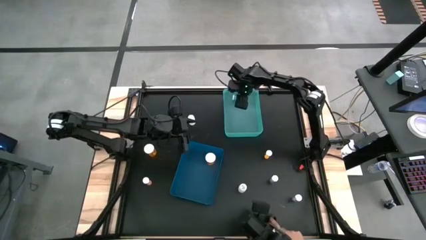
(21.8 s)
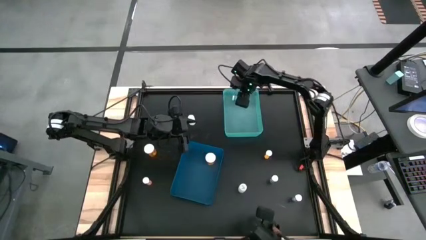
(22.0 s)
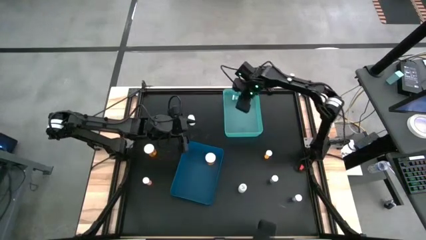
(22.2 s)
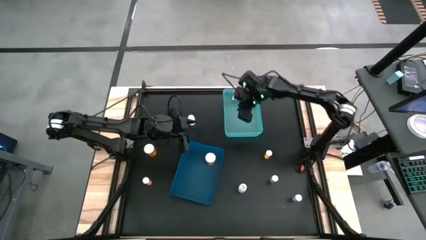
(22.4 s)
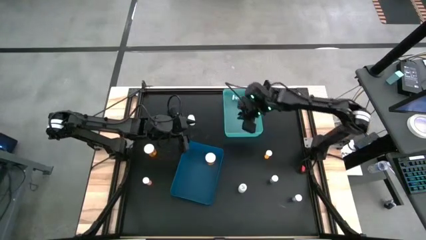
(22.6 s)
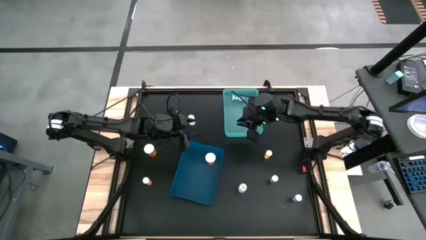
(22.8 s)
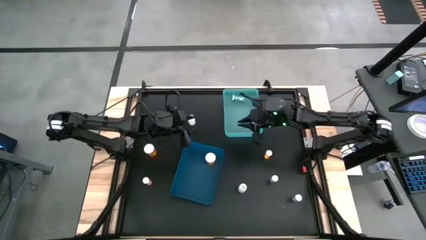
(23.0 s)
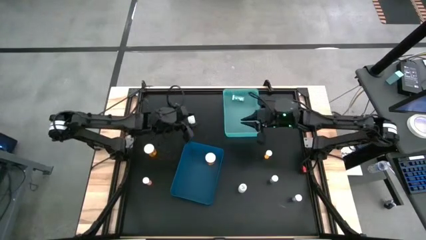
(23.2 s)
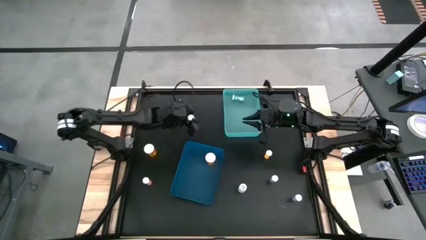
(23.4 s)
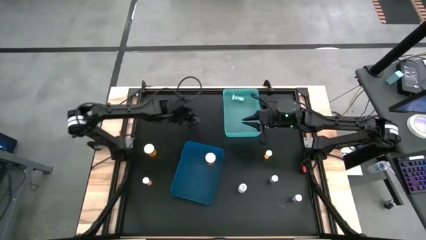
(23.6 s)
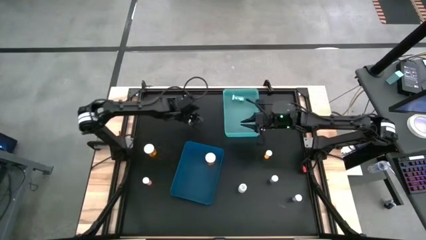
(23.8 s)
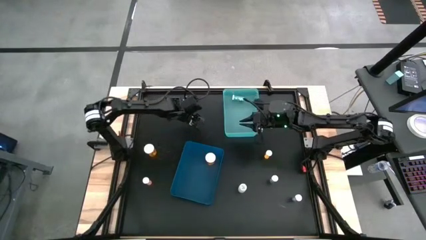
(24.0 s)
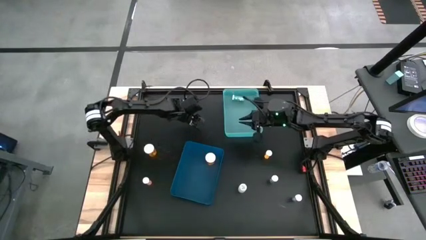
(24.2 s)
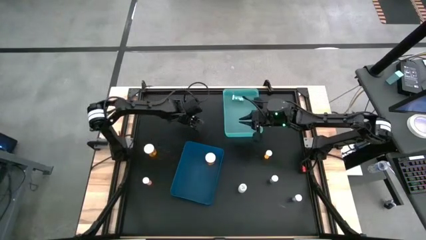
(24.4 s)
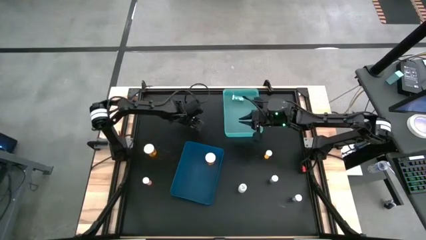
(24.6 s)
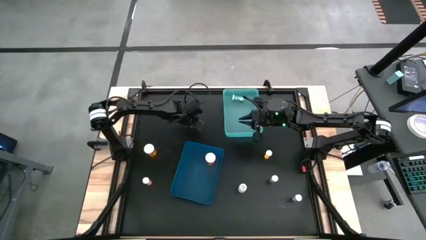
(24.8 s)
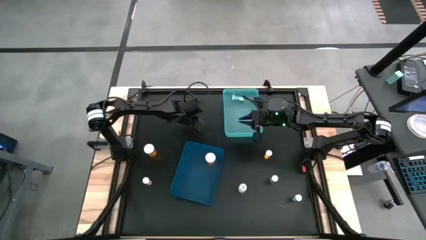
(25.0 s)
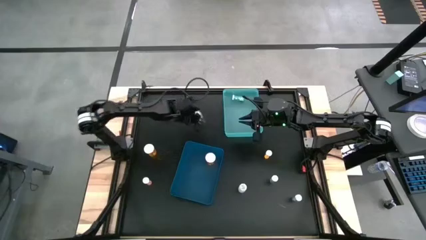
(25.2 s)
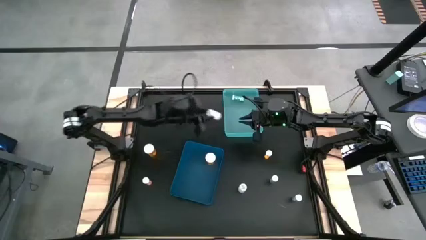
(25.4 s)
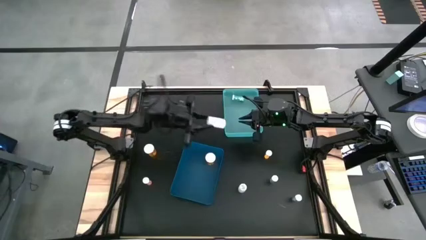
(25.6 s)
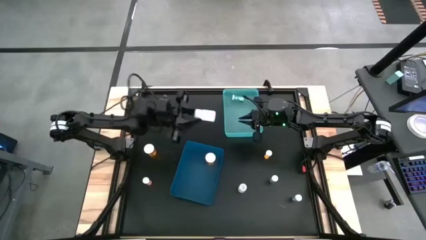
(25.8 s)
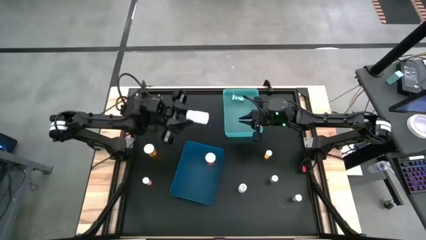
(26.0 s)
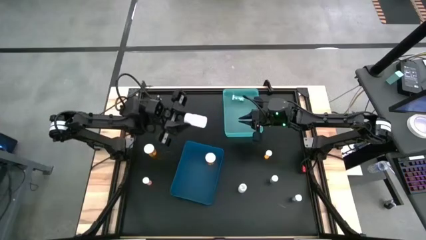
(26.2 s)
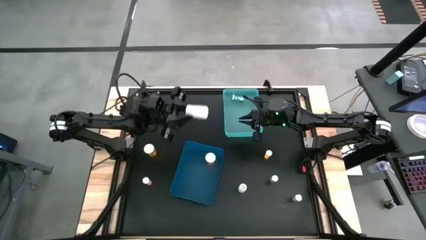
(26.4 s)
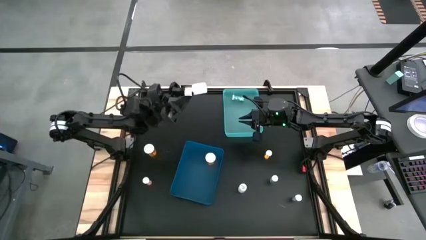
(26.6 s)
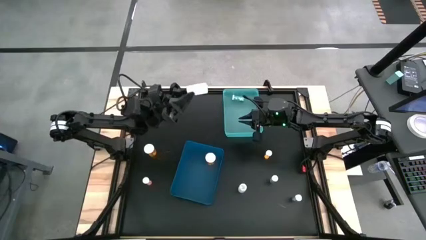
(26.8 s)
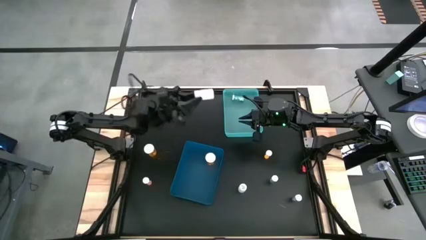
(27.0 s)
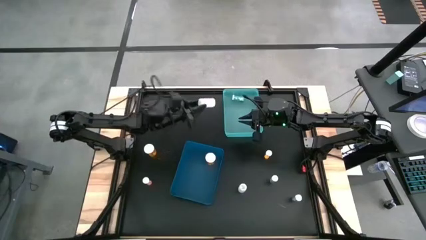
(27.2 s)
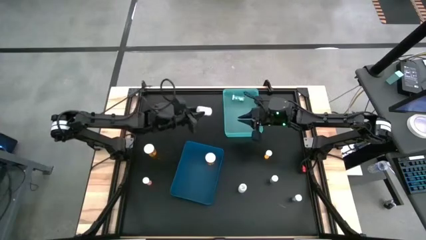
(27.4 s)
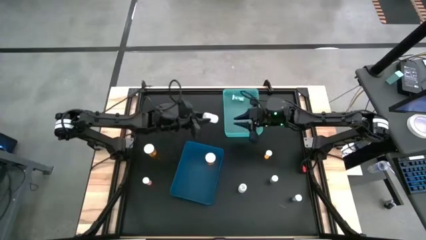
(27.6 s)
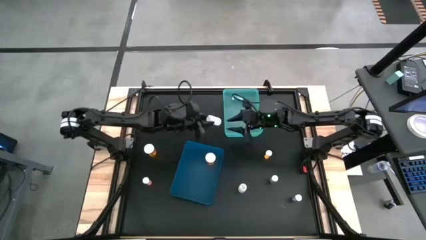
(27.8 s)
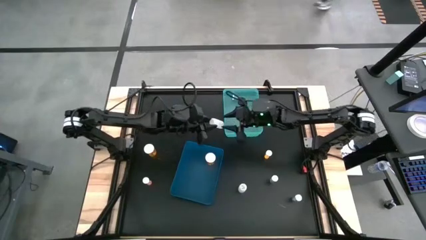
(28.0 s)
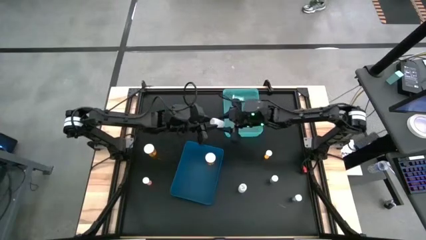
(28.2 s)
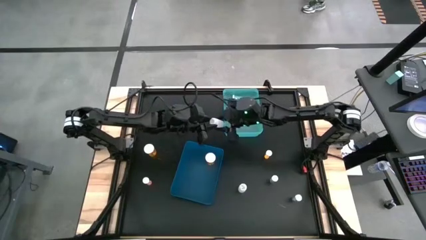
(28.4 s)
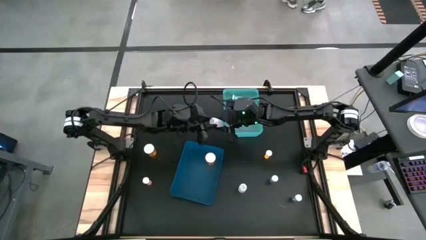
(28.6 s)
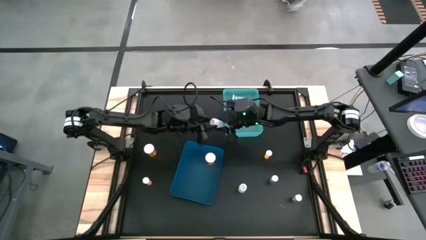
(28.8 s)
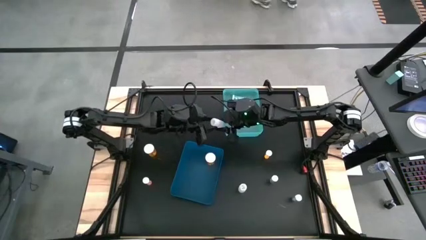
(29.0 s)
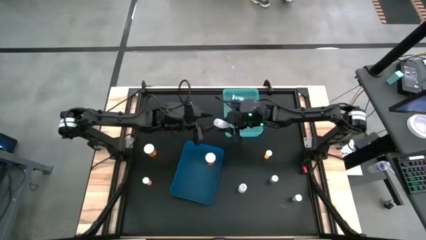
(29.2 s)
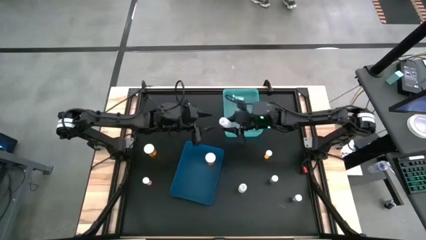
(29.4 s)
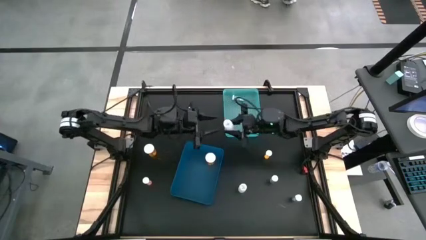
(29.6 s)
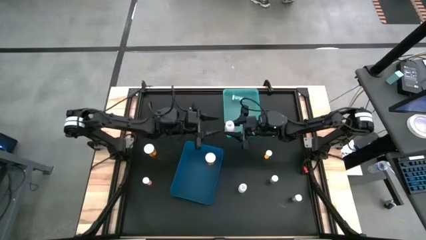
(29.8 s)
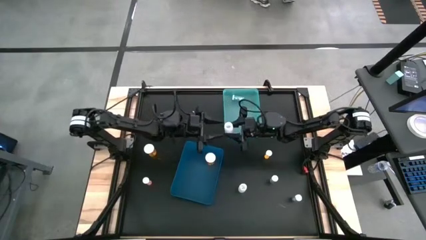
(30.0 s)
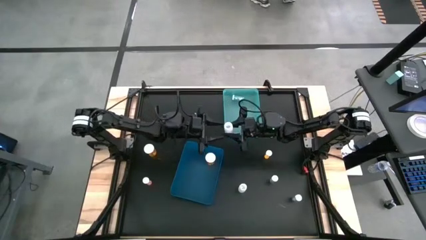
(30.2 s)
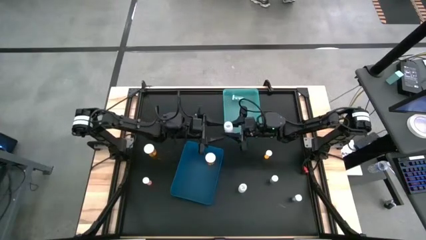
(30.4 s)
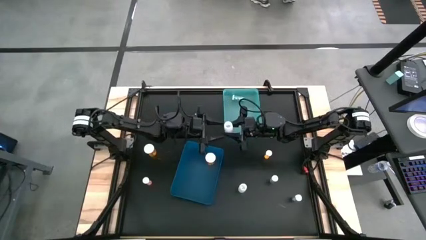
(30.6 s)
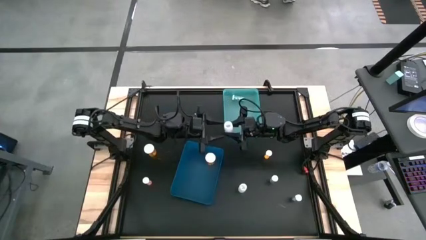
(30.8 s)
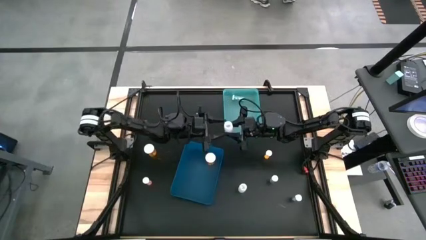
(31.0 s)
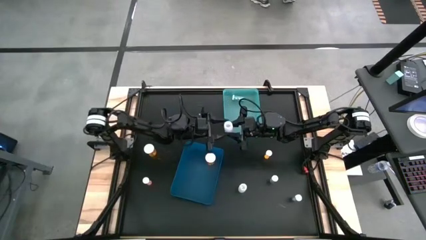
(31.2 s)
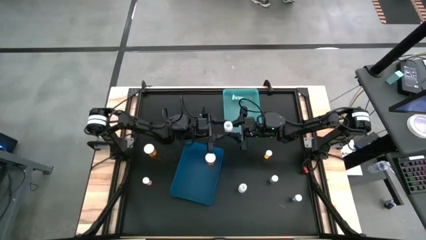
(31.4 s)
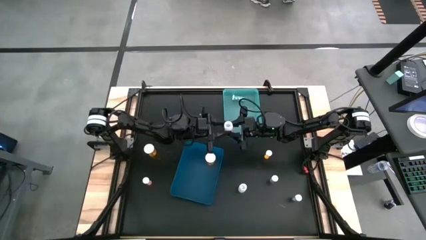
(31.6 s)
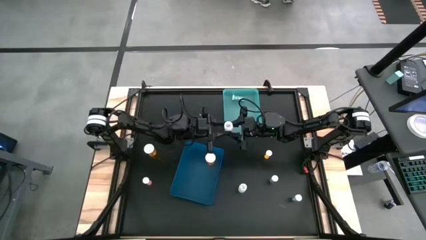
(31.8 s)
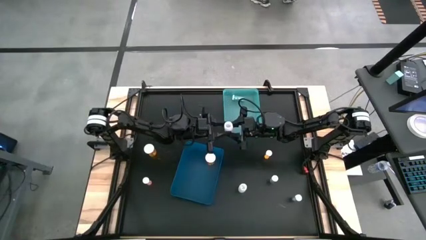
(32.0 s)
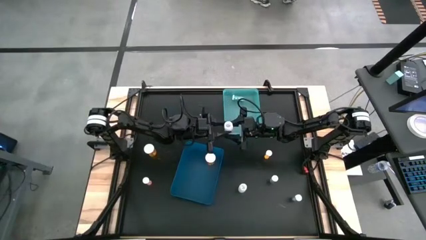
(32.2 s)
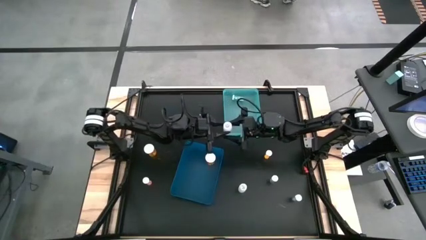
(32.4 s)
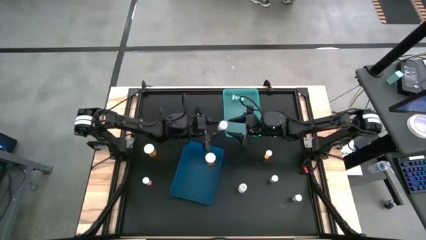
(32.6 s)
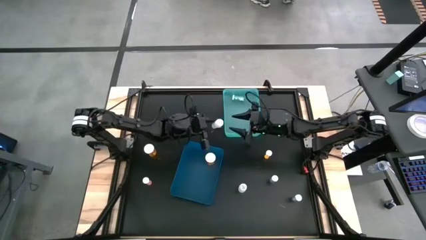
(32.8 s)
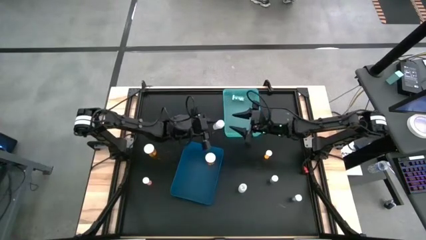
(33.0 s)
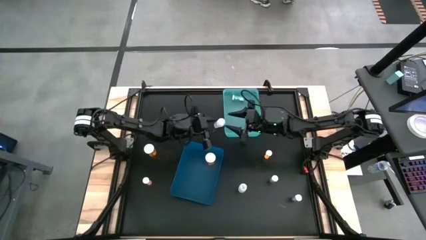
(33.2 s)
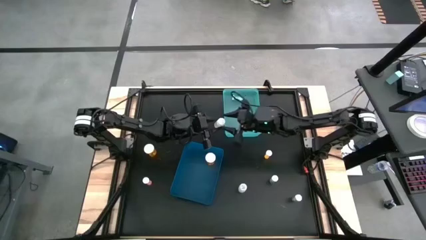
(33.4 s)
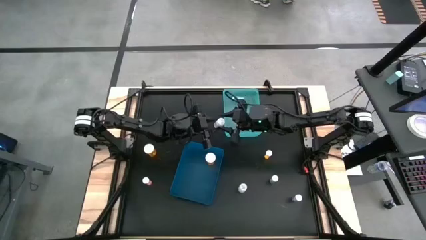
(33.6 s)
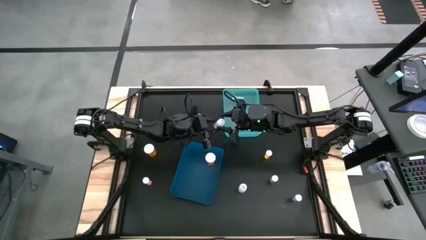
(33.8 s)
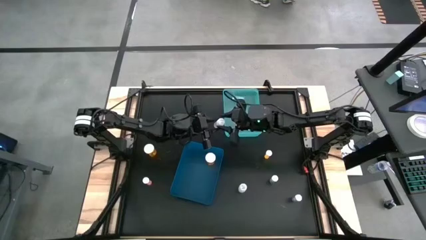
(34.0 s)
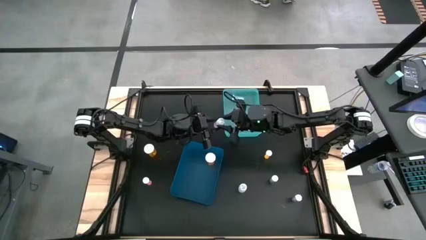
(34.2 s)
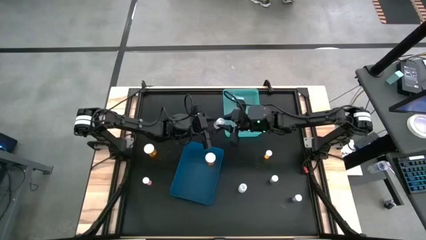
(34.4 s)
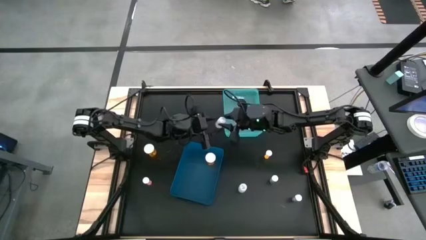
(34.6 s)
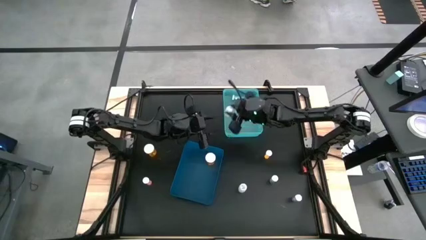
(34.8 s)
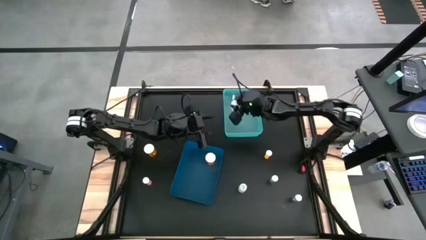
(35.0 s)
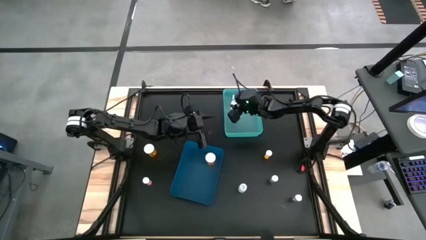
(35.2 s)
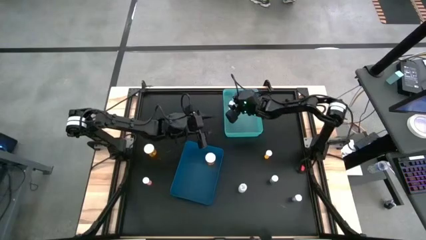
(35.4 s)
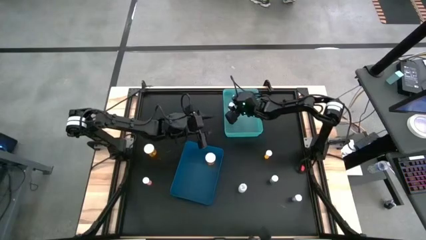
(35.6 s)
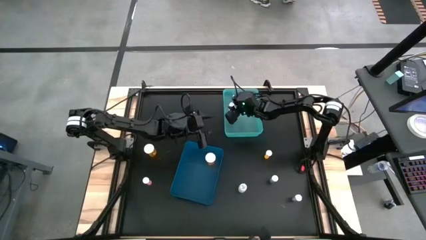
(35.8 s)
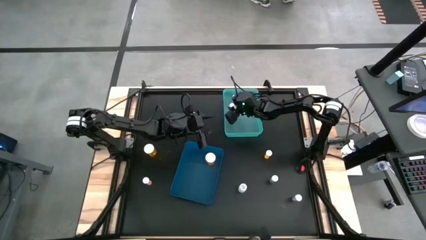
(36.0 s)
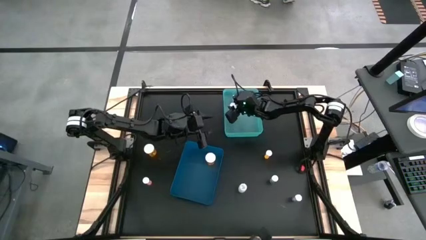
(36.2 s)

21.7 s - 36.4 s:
Task: Pick and place medicine bottles into bin by pill shape (circle, oval)
Put the white tablet bottle into the green bin

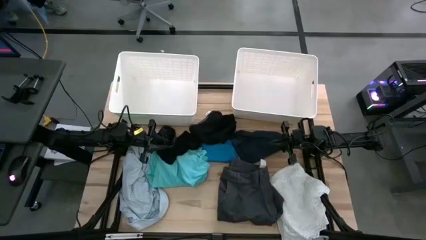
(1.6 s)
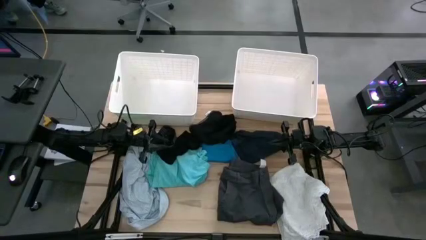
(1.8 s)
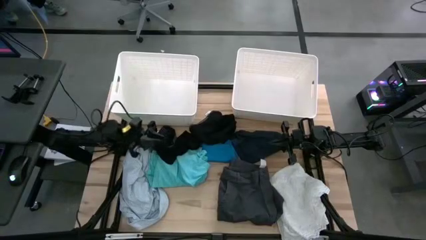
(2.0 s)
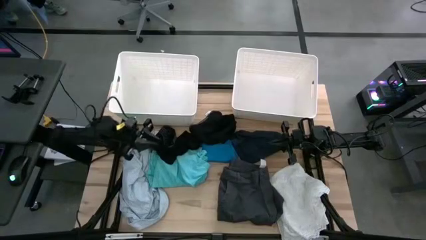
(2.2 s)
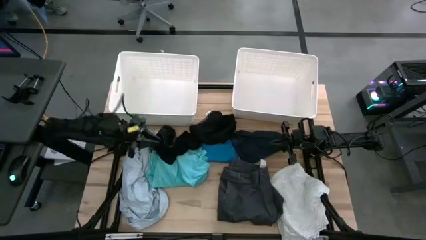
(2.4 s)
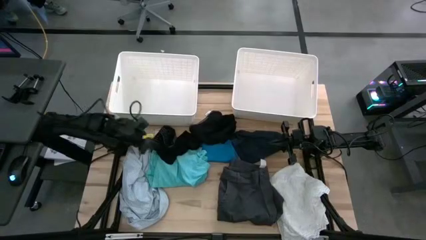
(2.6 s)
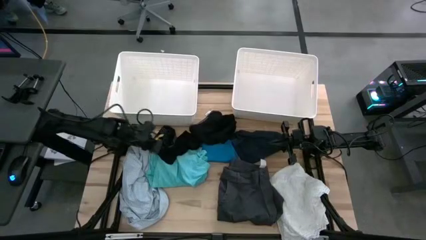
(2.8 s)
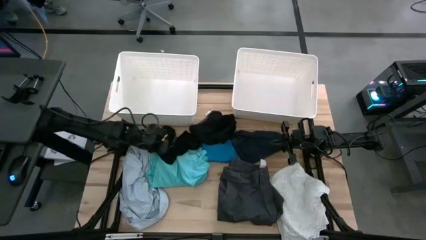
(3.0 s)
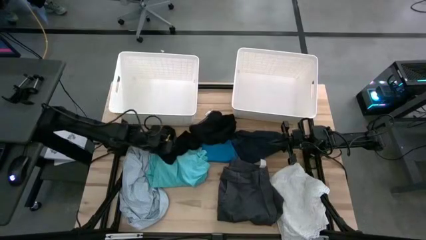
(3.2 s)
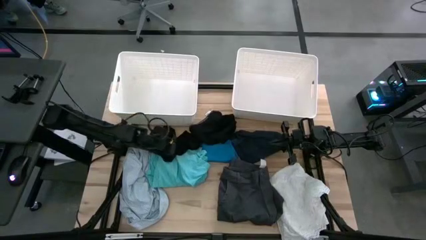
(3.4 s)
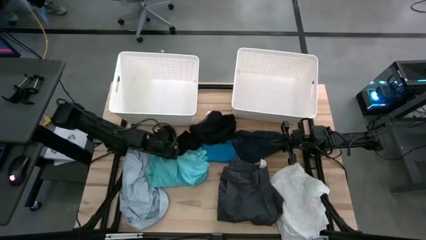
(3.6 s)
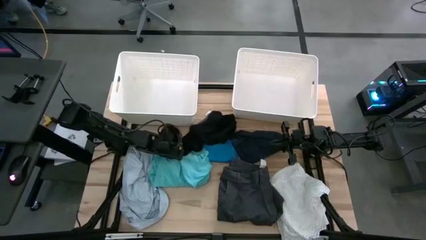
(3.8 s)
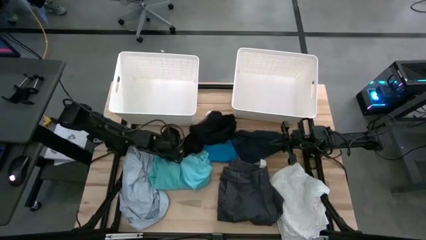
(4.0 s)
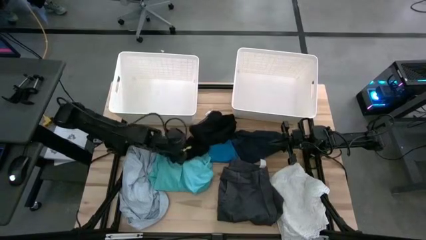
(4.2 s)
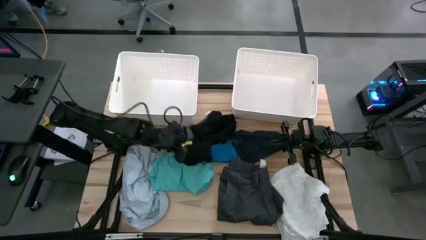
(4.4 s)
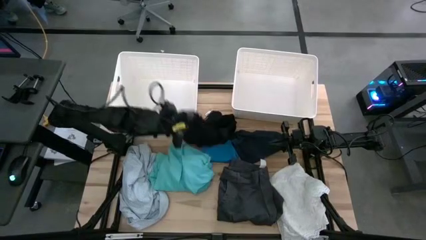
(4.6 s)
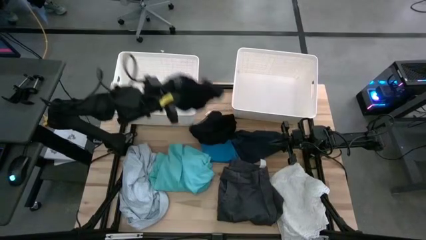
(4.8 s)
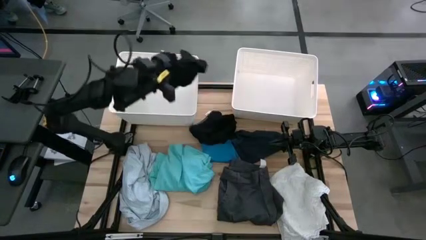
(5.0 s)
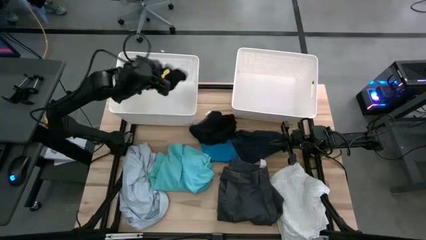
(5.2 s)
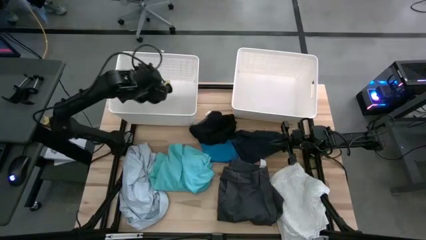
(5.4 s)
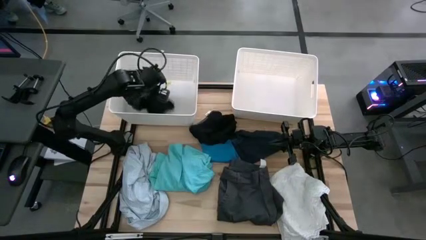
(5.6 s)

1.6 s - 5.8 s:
Task: Sort clothes
Put the left black boxer into the left laundry bin
